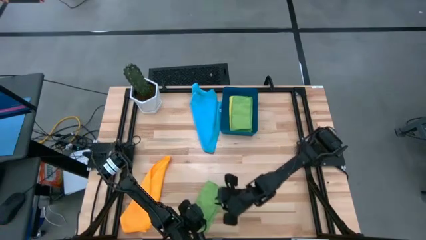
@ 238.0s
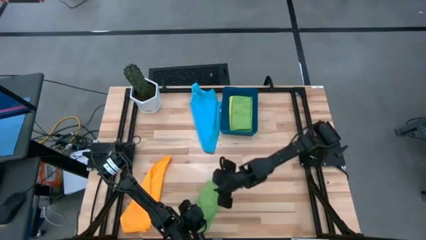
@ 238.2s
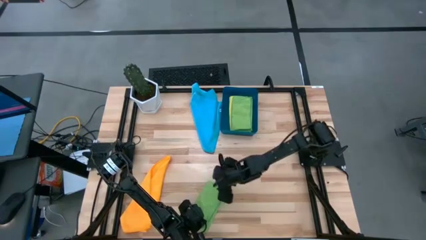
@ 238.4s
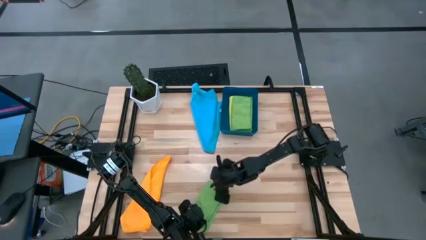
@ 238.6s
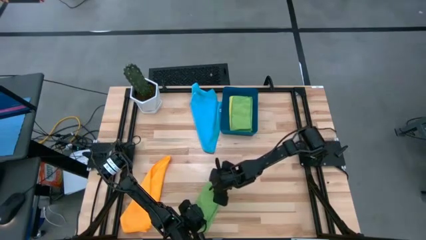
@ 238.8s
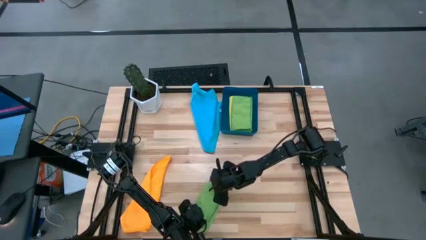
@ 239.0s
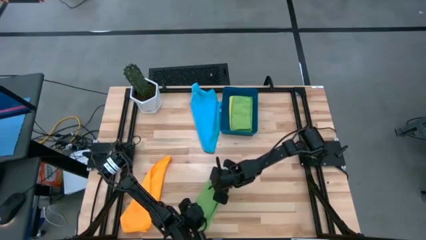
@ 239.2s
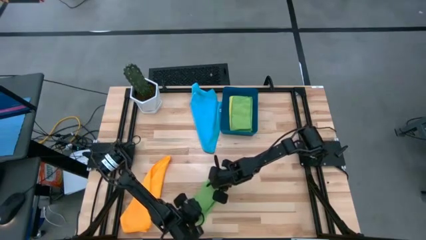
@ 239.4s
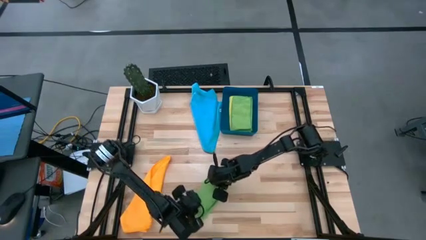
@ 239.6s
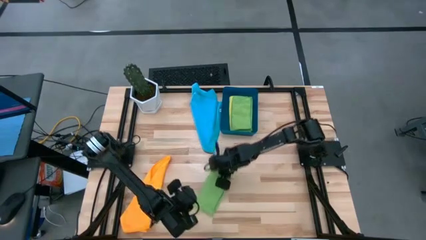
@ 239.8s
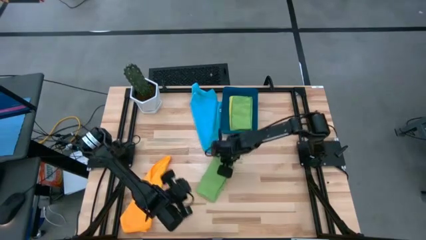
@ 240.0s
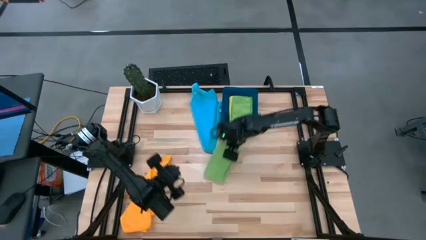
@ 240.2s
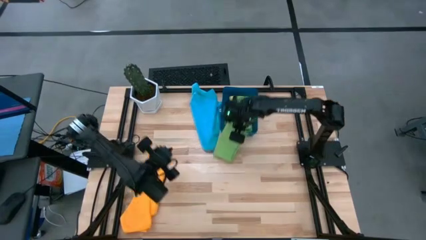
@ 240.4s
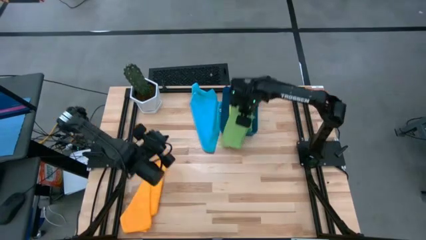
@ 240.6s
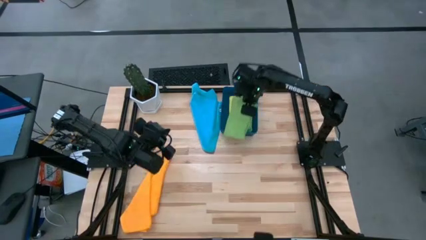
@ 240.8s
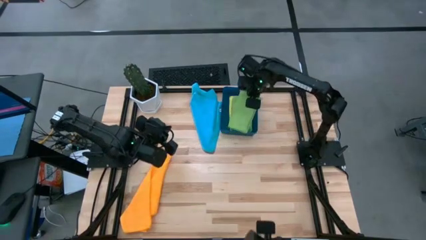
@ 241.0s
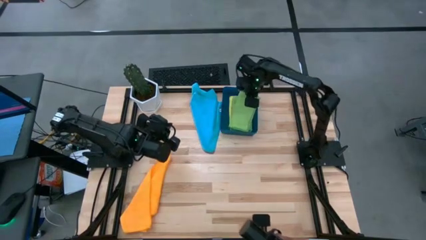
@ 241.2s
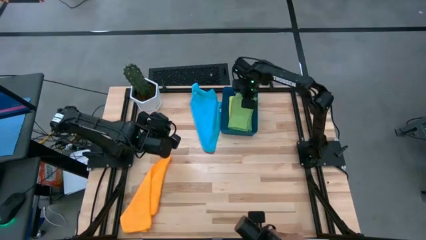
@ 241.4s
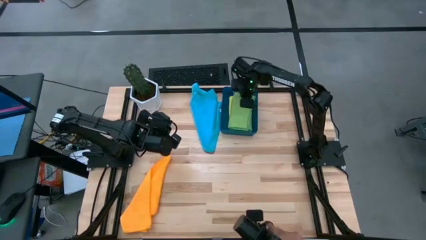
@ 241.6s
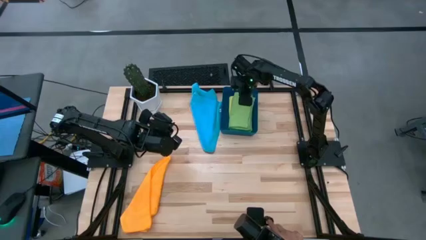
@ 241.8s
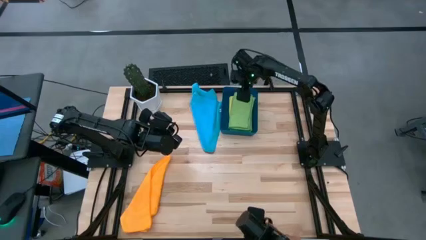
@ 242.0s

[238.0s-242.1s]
Task: Fold microfiber towels
Put the green towel into the blue bin

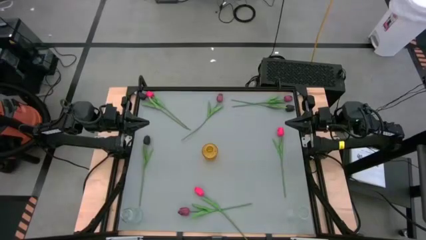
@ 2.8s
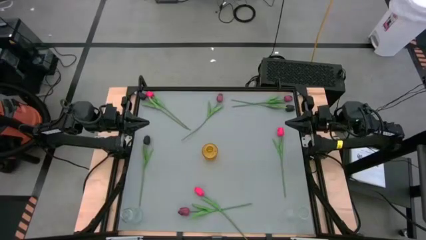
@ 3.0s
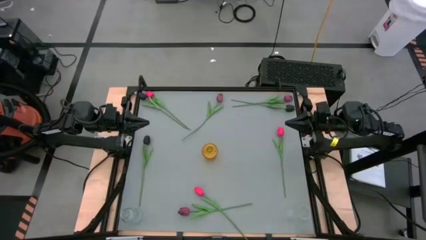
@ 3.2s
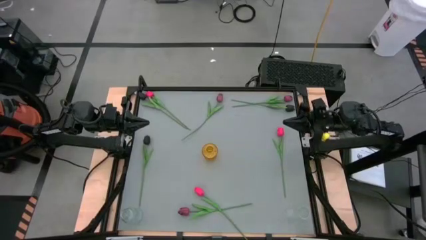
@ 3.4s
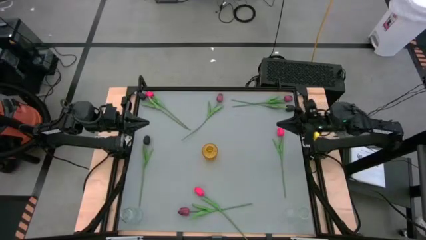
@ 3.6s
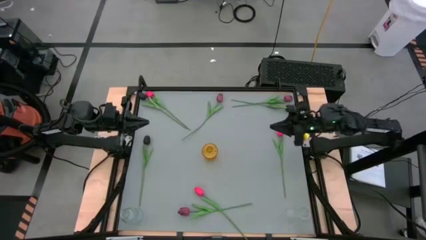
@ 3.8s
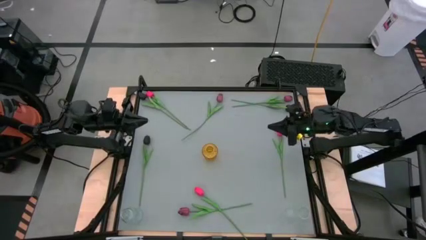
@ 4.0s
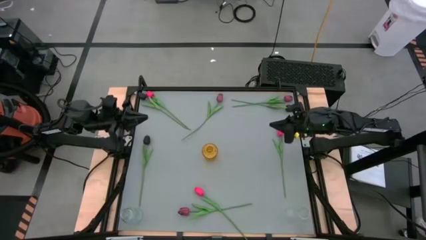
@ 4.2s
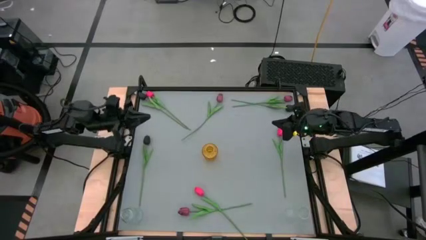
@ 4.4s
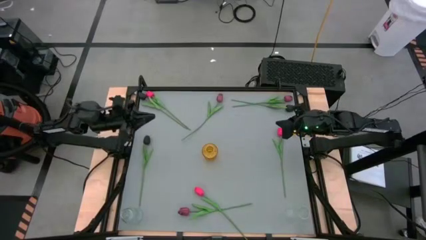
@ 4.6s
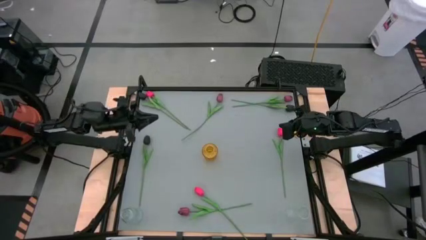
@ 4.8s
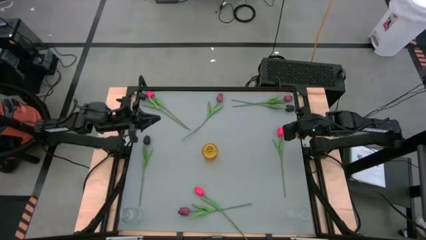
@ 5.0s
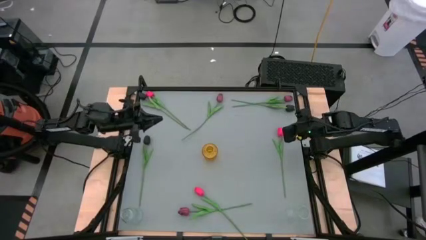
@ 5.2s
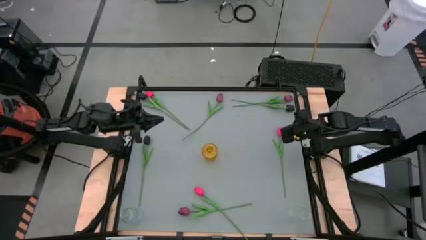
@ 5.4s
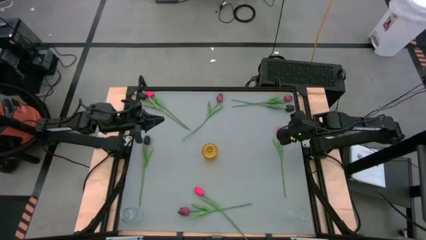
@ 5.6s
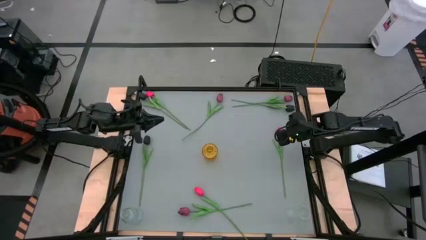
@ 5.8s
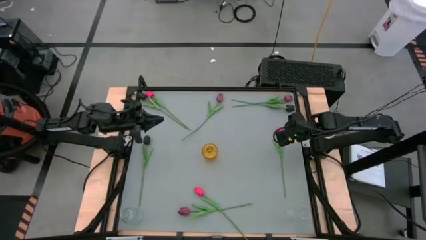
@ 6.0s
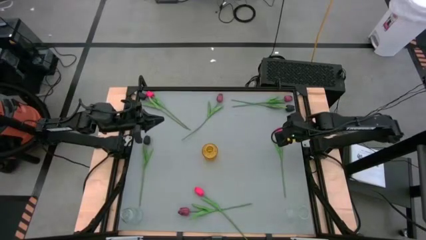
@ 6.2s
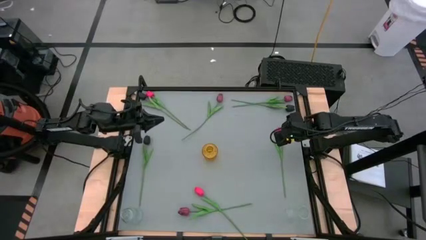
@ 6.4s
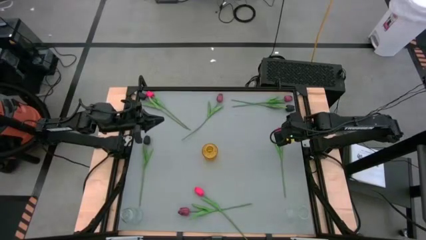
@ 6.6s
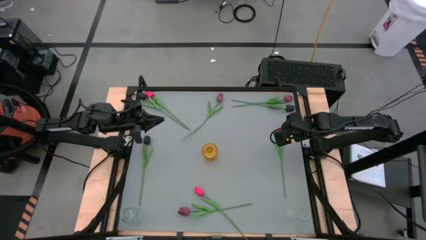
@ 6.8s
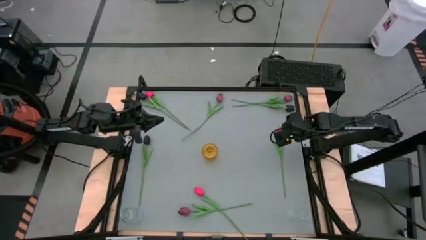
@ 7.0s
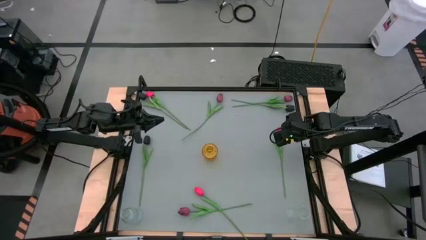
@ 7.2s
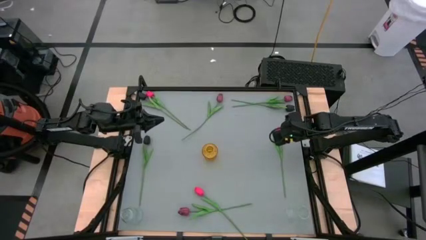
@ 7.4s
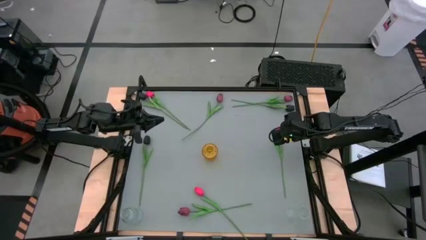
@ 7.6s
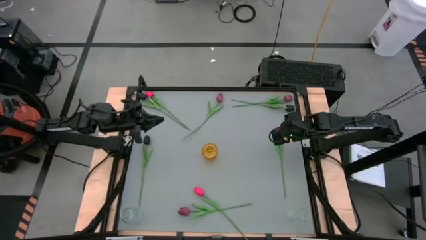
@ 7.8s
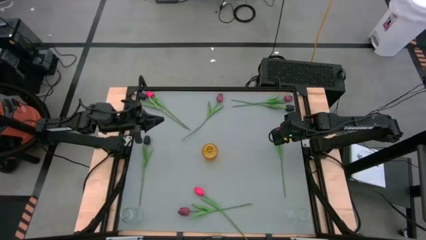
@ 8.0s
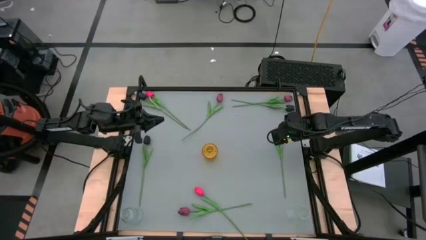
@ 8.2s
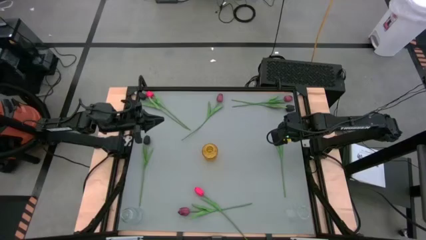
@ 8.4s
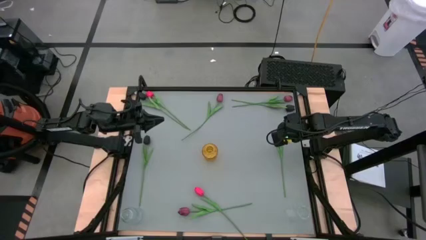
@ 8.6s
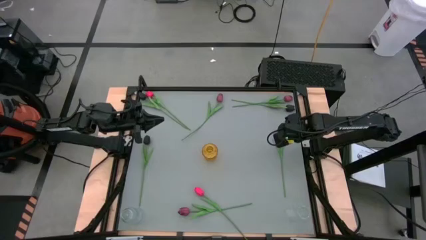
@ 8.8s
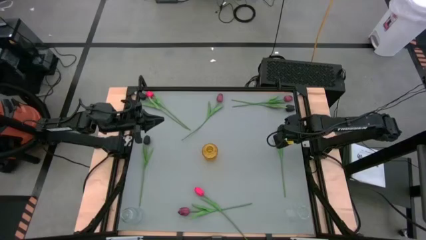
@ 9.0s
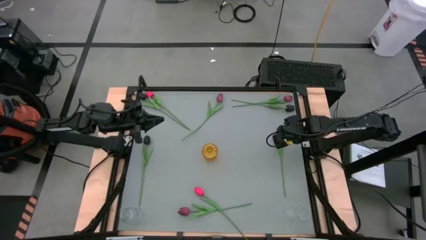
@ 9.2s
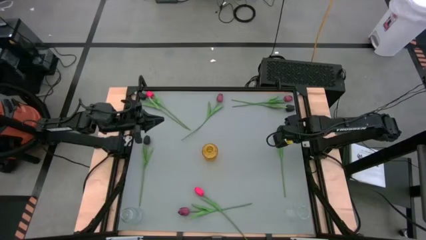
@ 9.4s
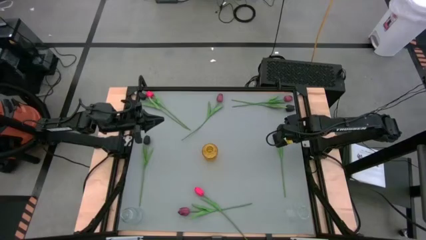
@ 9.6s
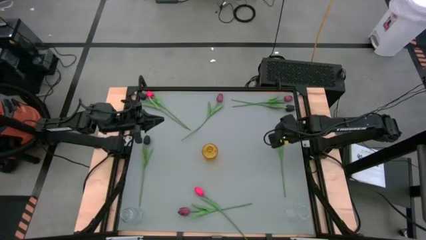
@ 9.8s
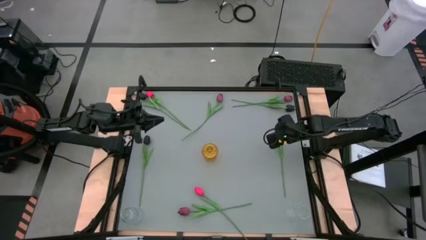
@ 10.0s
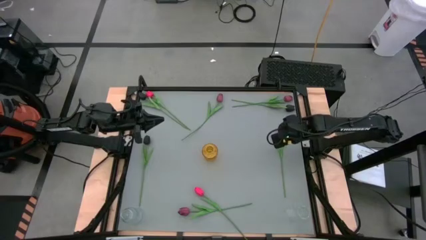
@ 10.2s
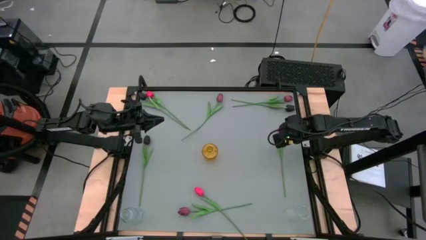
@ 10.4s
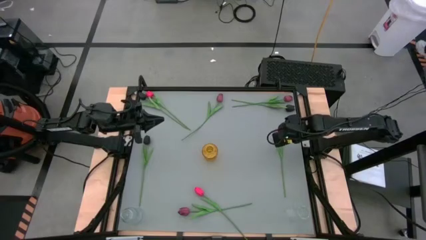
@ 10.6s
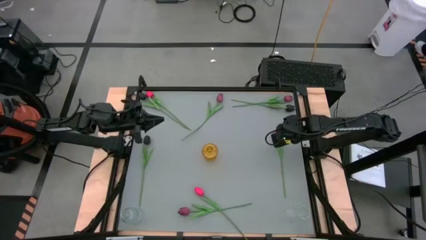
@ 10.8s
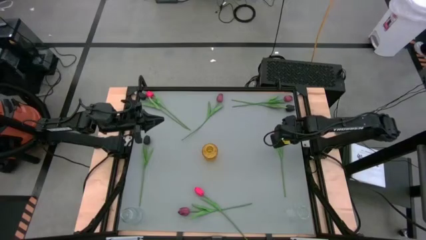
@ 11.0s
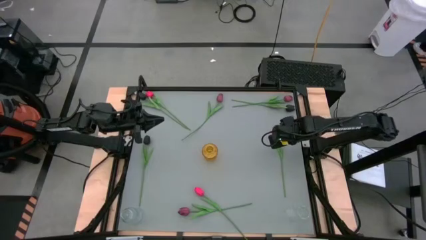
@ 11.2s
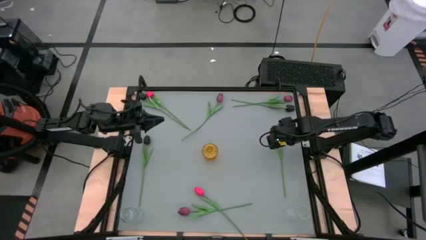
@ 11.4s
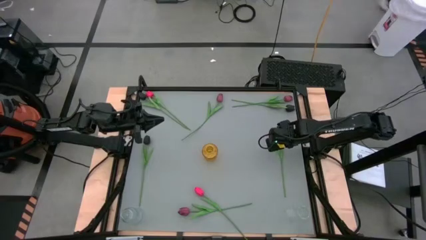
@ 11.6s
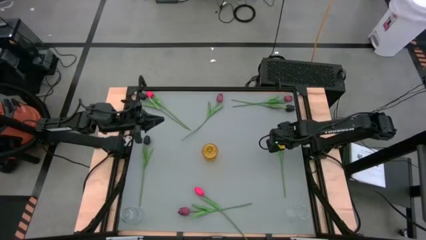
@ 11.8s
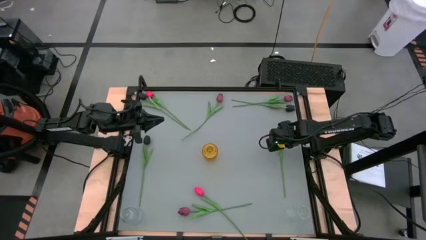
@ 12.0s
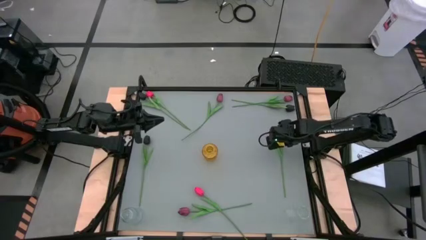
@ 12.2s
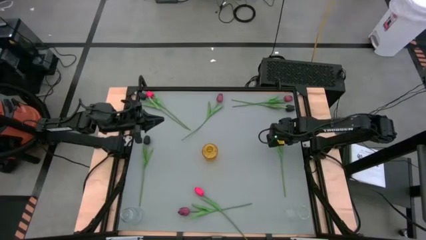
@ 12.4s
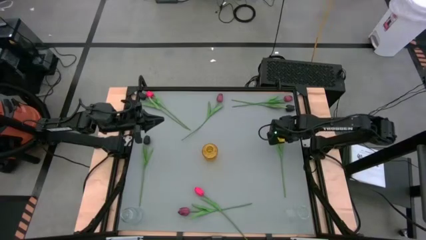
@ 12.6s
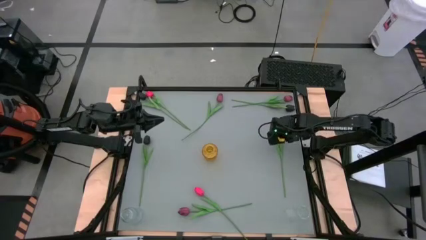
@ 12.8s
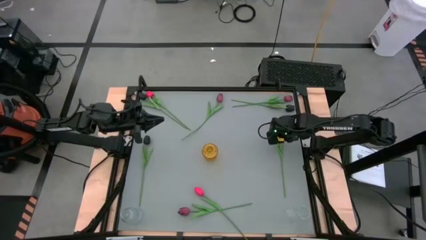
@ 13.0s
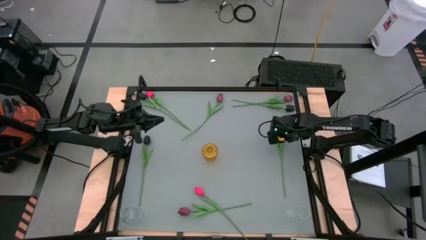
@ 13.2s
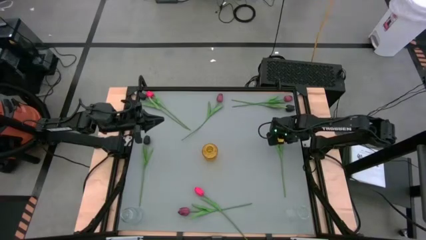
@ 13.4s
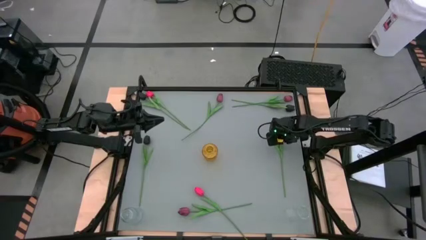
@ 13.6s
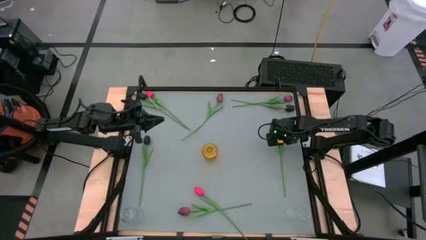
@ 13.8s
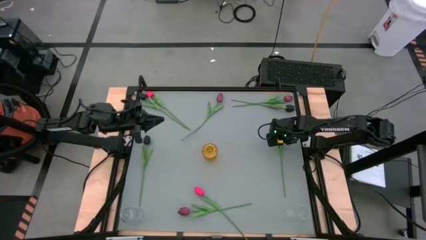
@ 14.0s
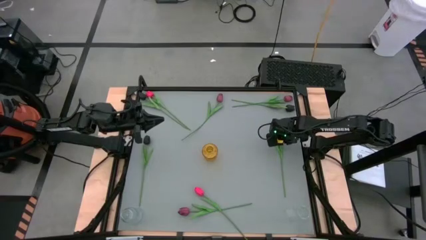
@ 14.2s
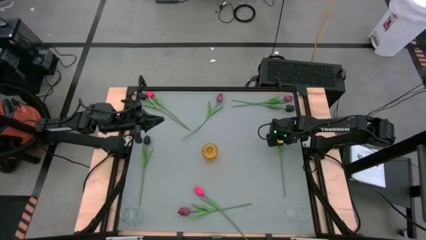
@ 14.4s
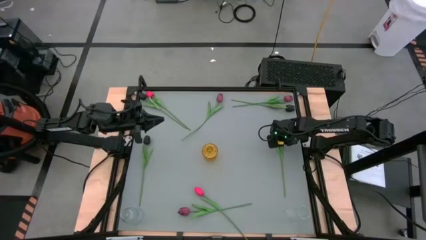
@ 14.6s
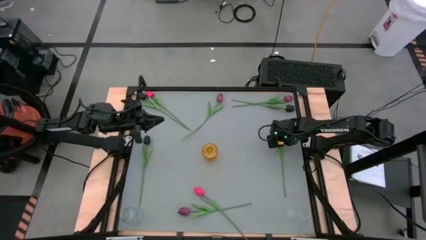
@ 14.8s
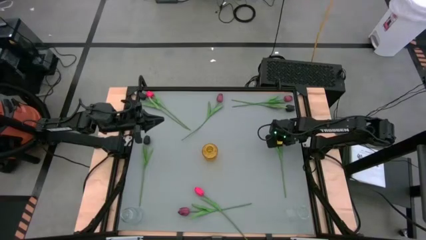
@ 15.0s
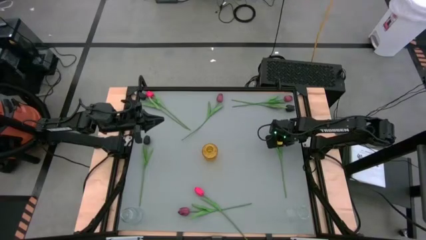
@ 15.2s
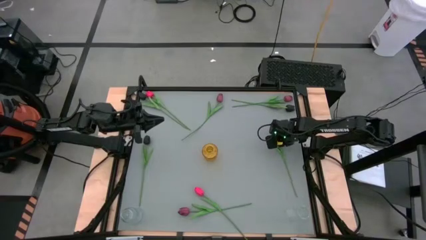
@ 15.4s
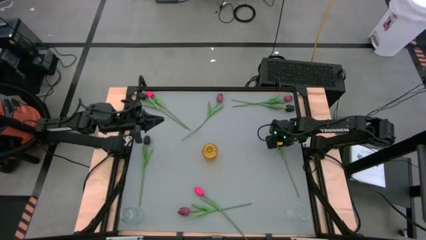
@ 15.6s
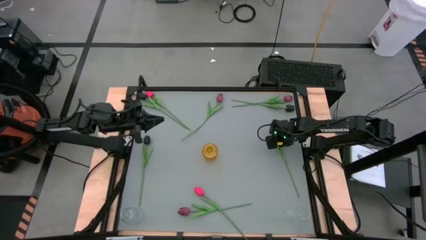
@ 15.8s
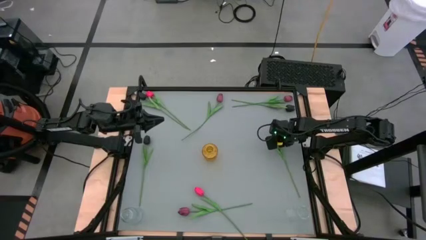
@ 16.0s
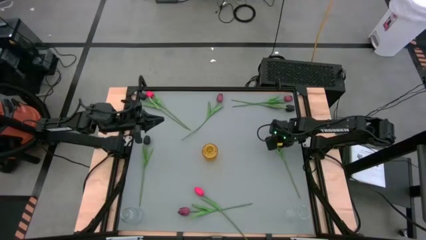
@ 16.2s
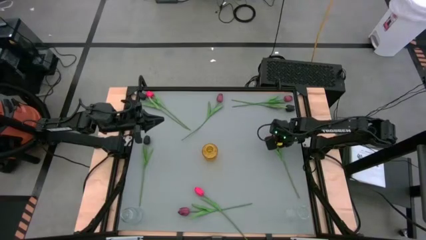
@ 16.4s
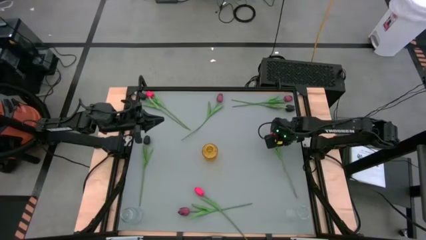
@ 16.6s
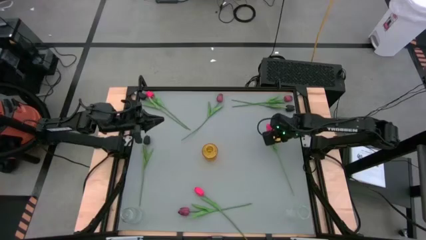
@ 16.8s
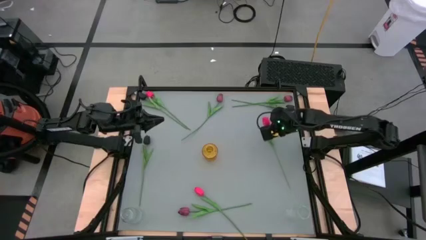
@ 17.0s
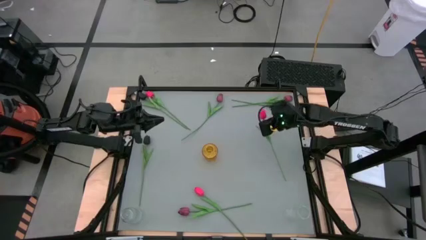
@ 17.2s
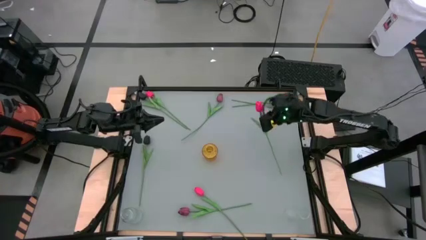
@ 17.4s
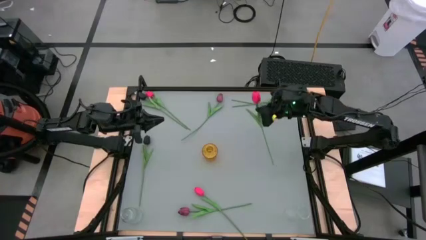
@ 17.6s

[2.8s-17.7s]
Task: Sort flowers into vase by color
Put the middle right pink flower into the yellow vase
